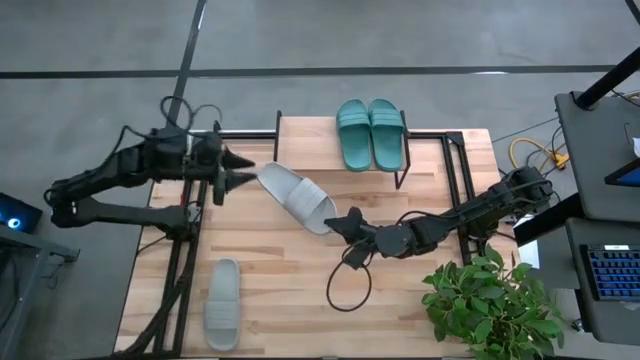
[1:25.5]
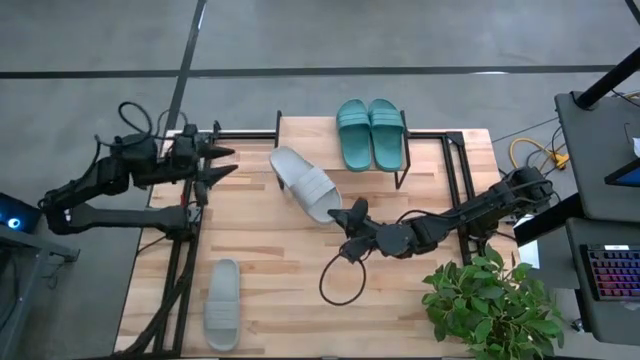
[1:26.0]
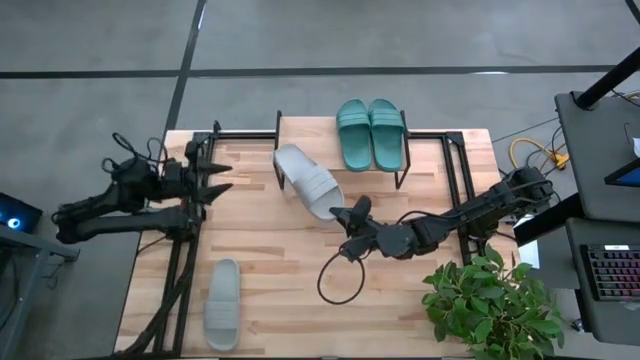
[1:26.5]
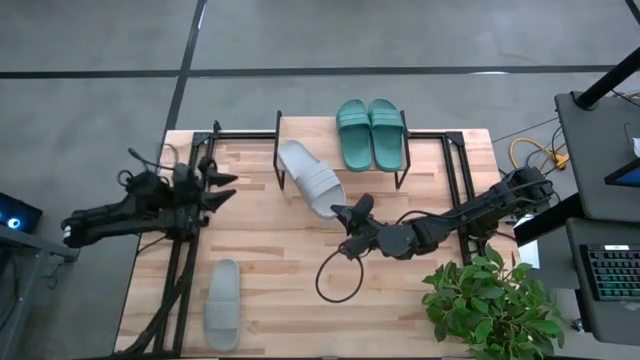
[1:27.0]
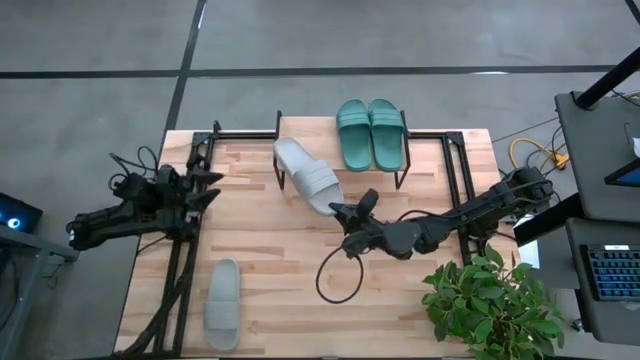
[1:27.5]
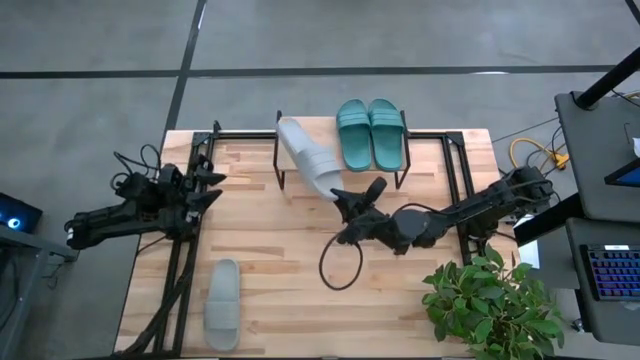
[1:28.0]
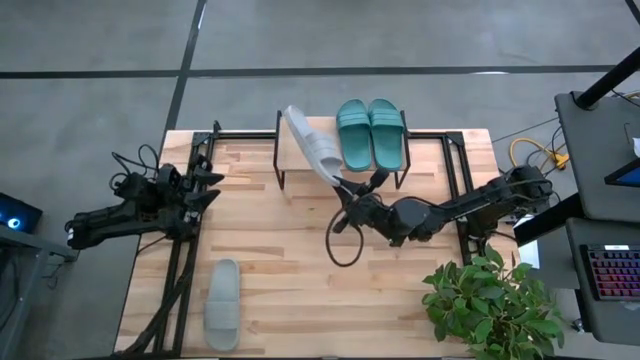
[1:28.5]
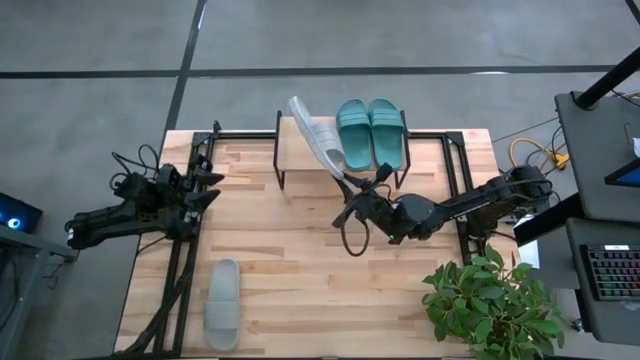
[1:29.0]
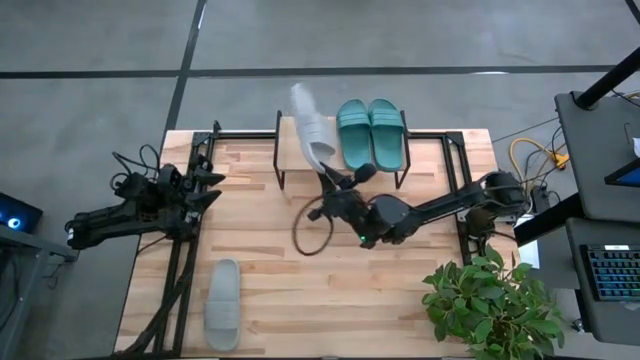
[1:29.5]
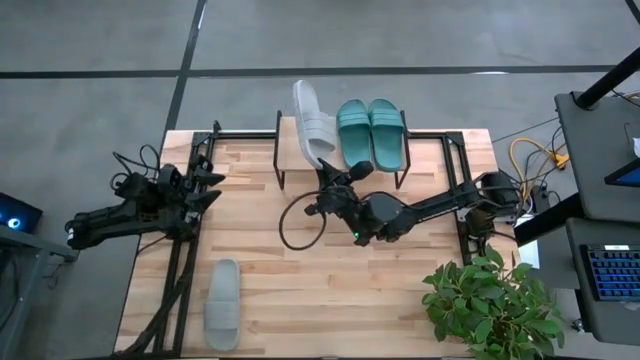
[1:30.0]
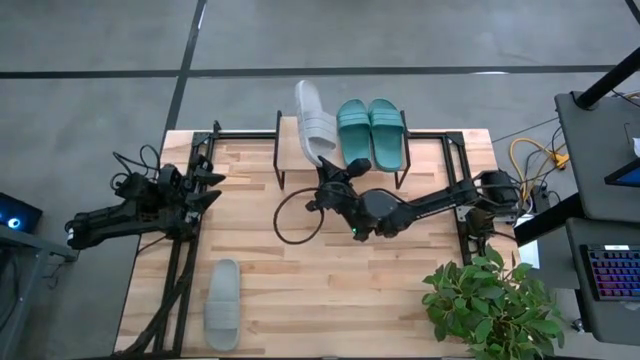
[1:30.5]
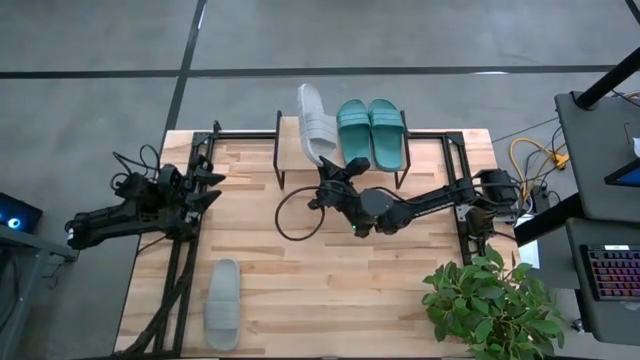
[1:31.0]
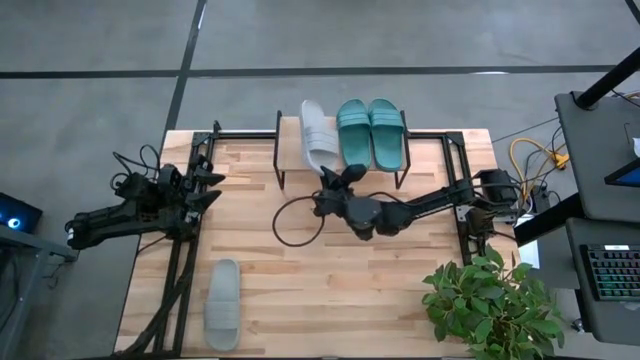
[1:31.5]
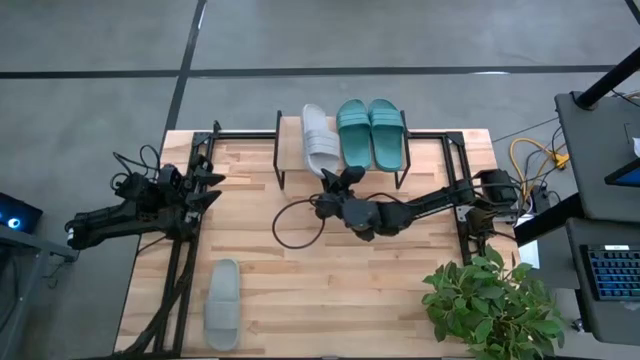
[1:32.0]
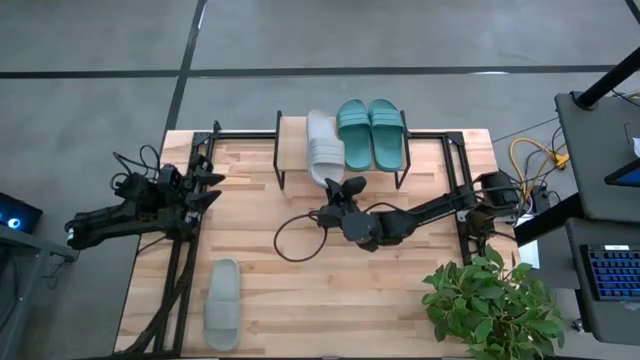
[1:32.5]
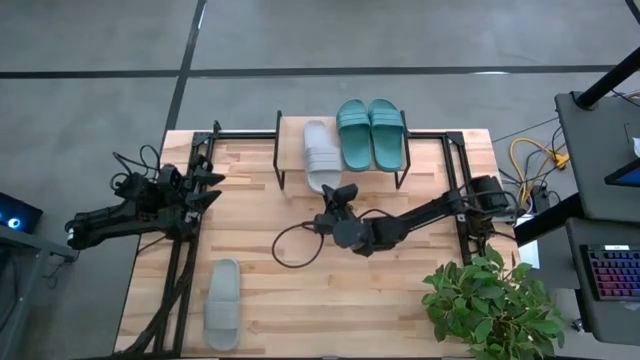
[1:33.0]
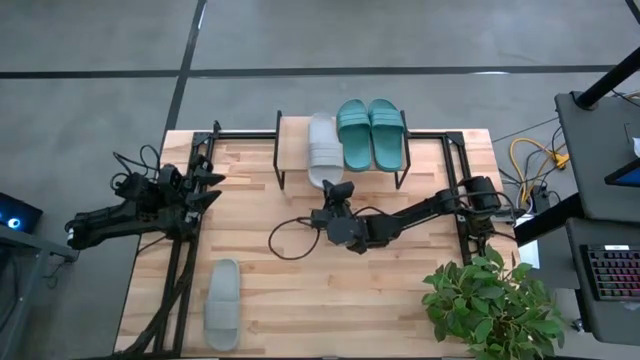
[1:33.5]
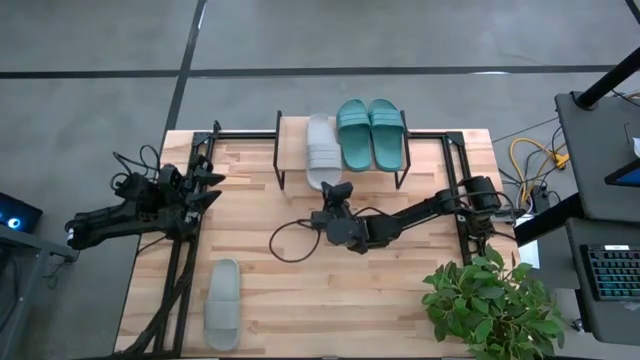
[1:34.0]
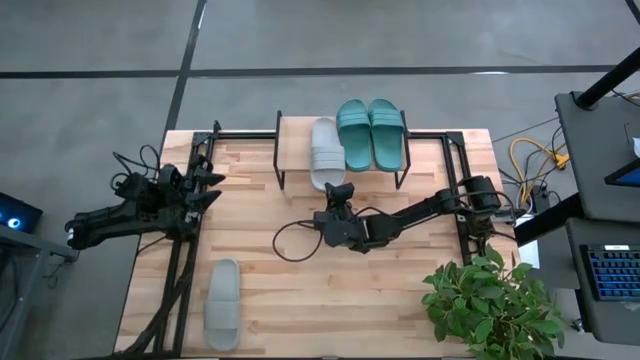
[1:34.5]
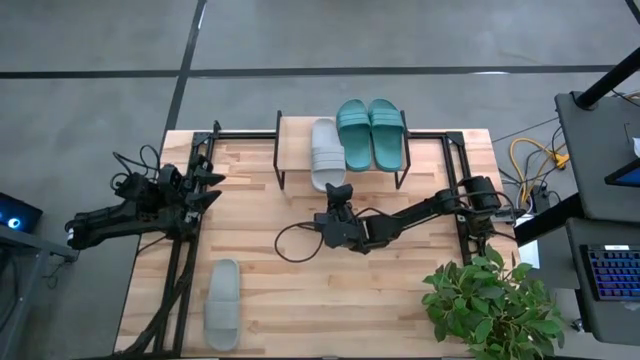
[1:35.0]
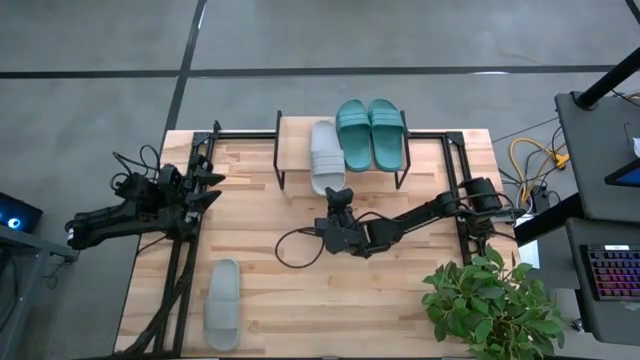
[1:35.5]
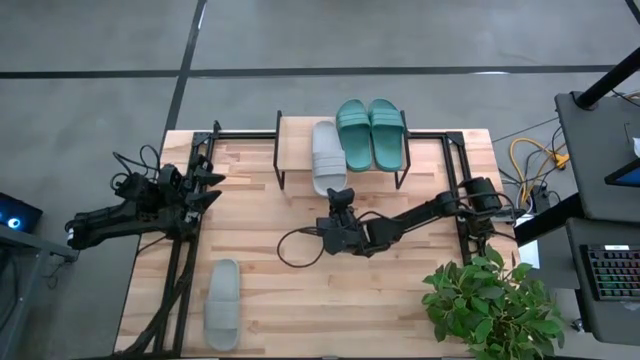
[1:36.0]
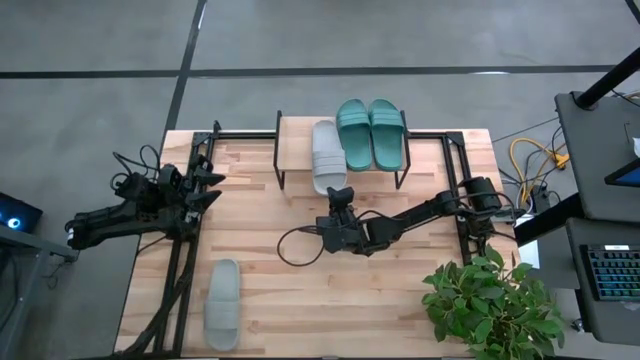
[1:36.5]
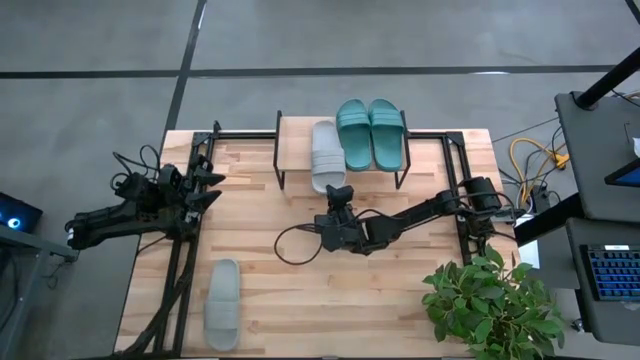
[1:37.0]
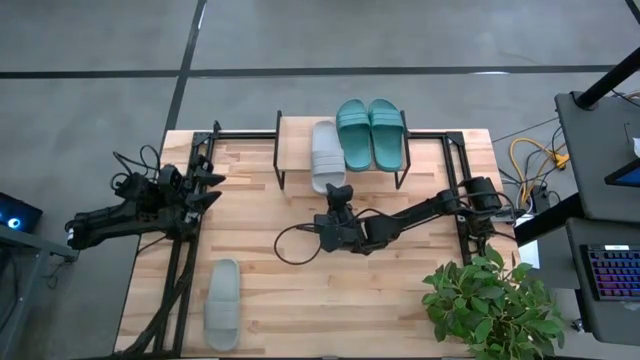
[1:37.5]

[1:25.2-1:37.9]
Task: Pick and place slides into the shelf
Put the top gray slide on the shelf

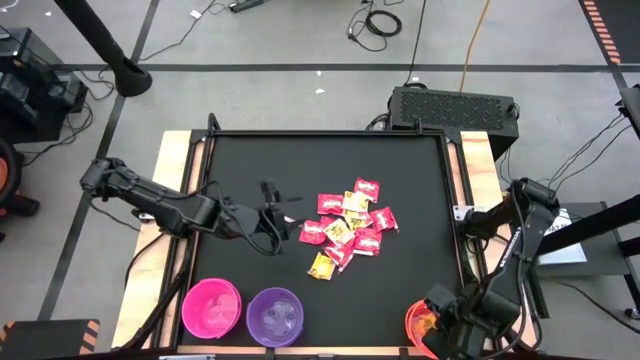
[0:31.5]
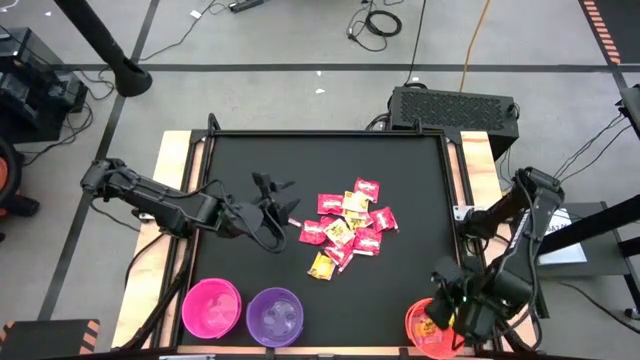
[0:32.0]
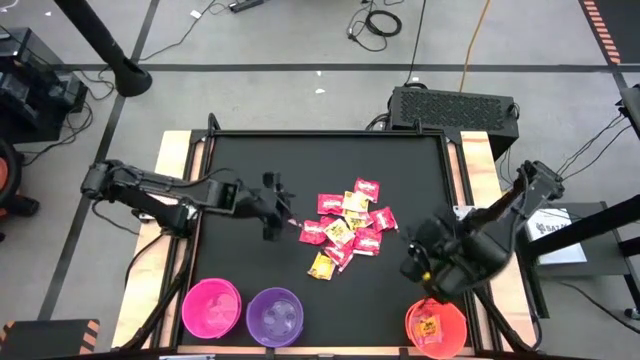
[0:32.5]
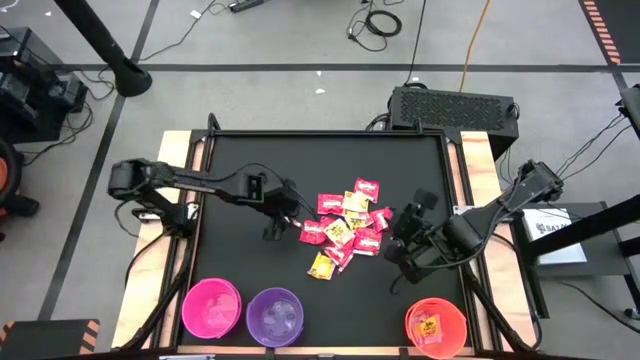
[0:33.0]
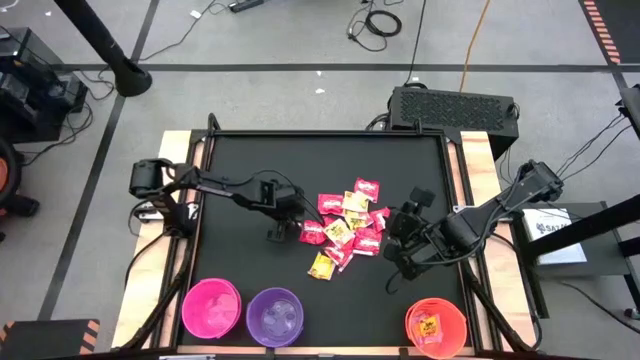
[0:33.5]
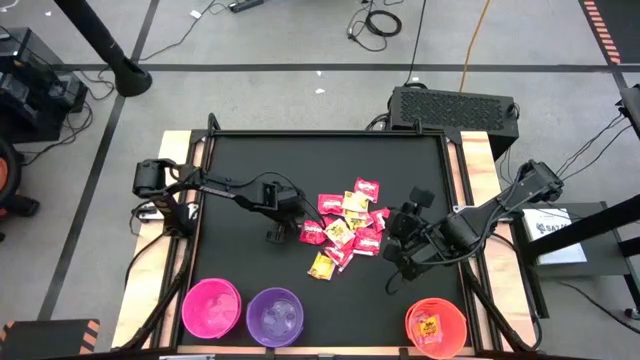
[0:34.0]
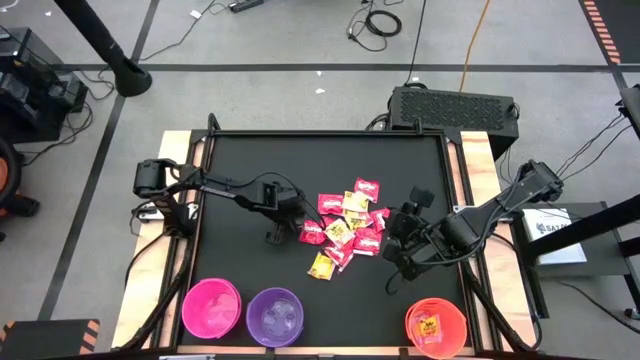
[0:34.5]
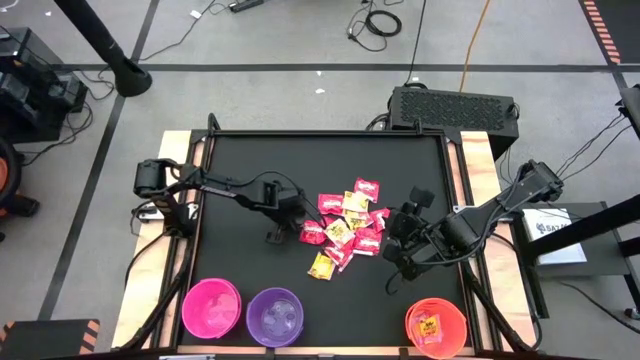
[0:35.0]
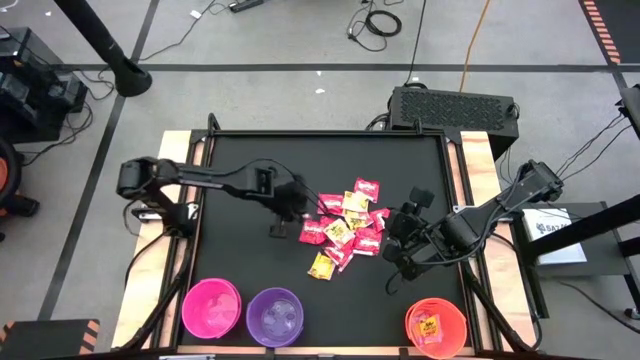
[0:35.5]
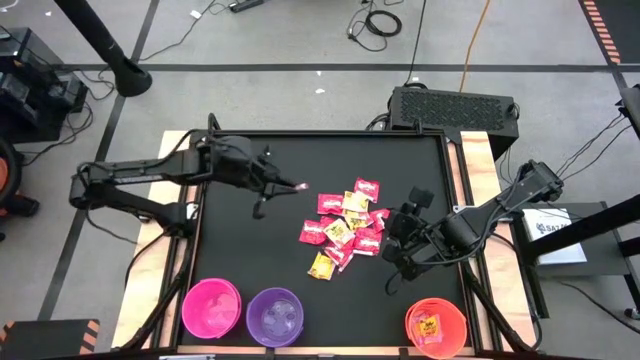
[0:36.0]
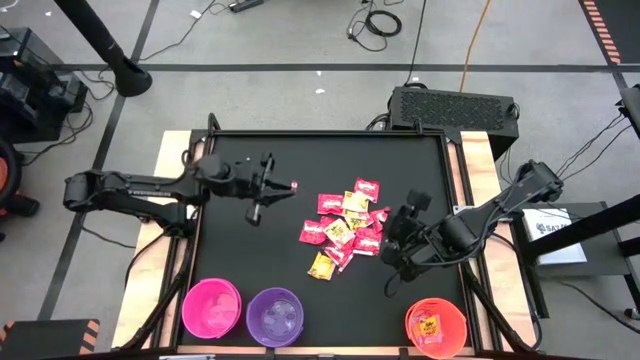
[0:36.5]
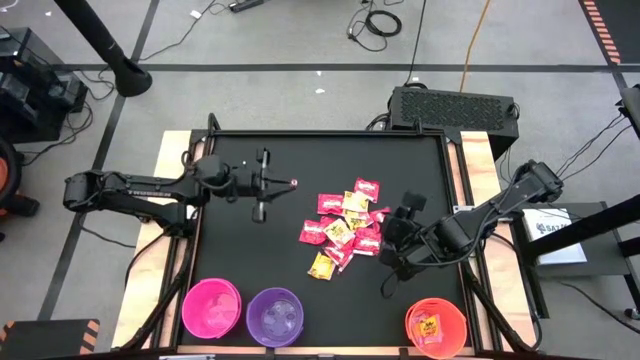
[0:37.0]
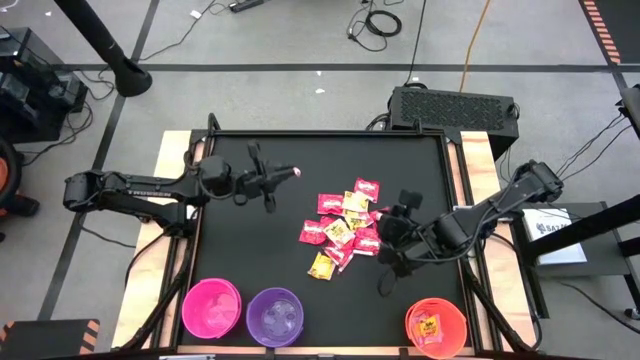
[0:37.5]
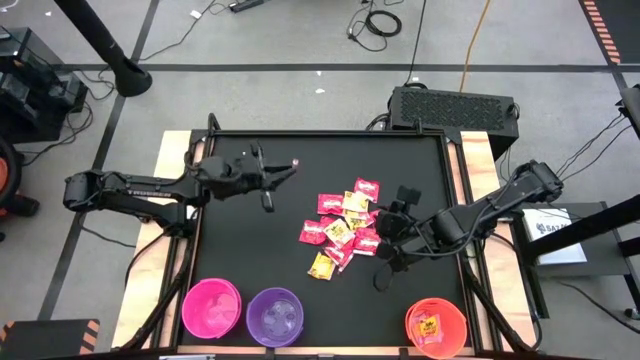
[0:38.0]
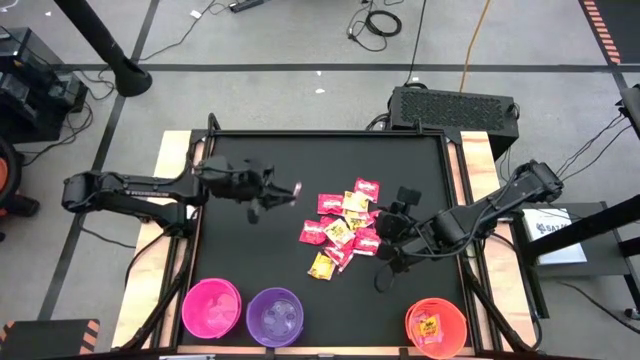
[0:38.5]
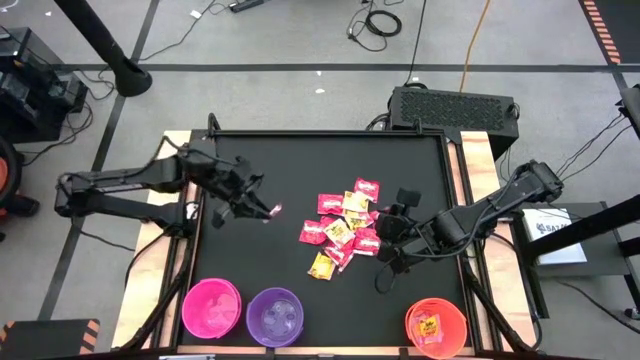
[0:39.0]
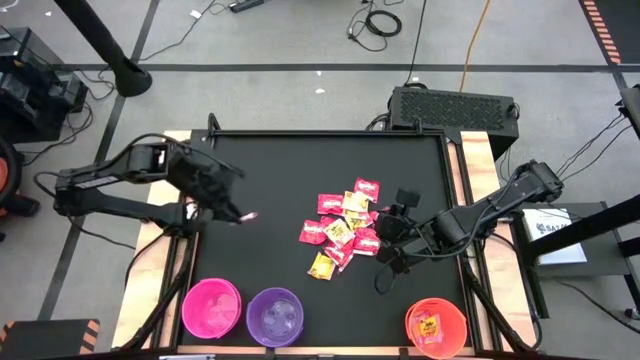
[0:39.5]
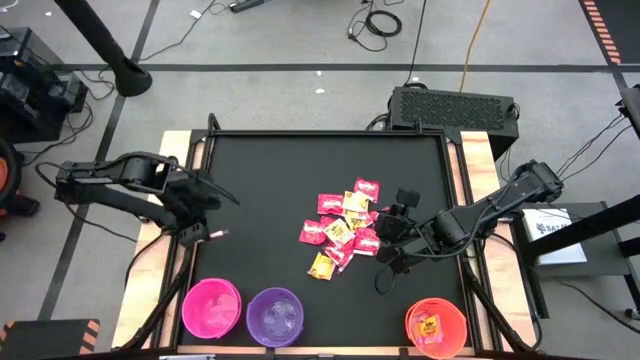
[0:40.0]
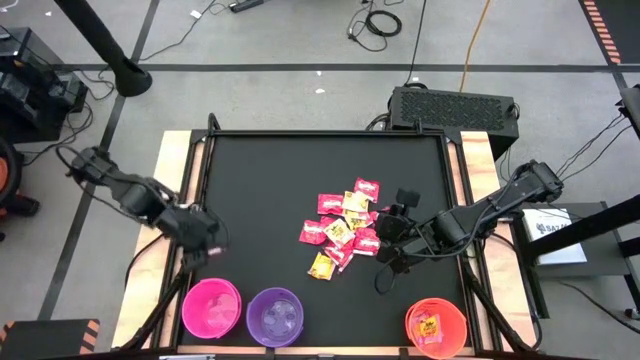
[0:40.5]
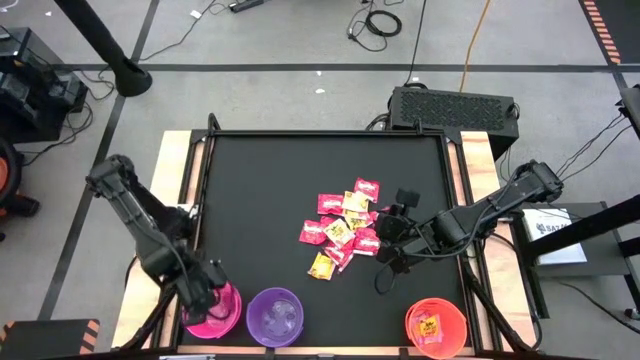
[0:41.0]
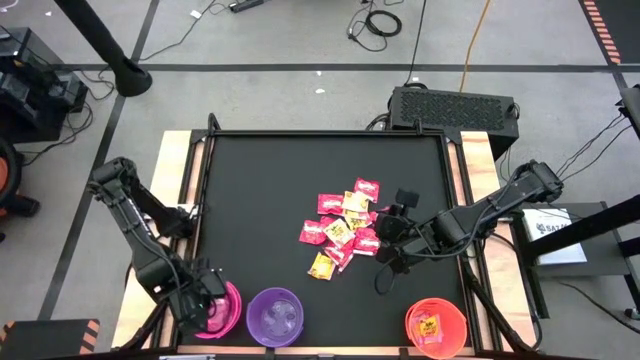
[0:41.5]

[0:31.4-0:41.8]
Task: Sort candy by brand, put in halloween buckets
Put the orange candy into the pink bucket
